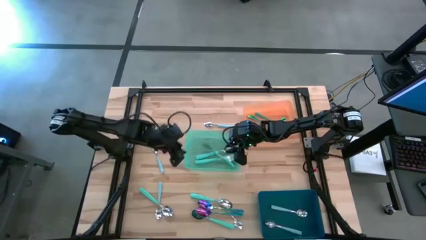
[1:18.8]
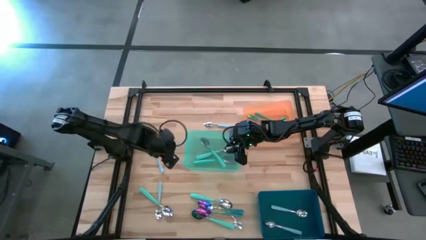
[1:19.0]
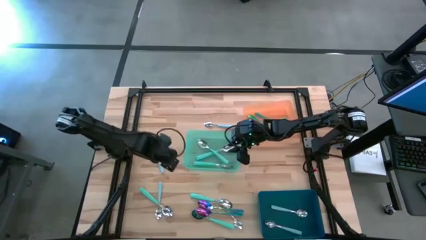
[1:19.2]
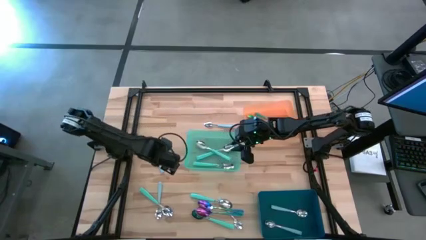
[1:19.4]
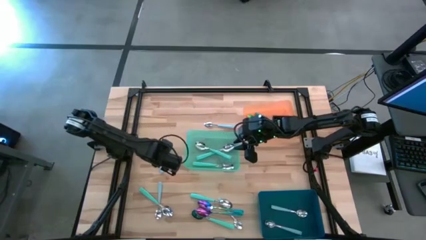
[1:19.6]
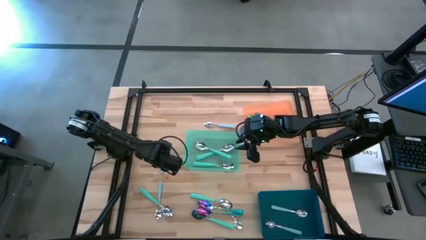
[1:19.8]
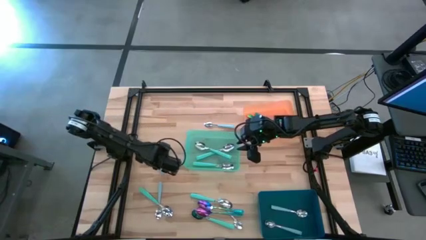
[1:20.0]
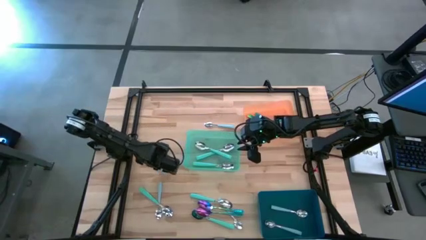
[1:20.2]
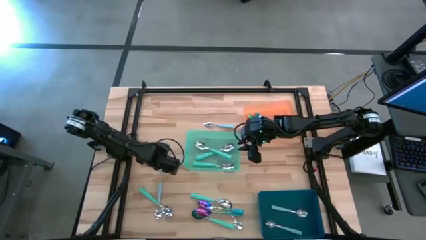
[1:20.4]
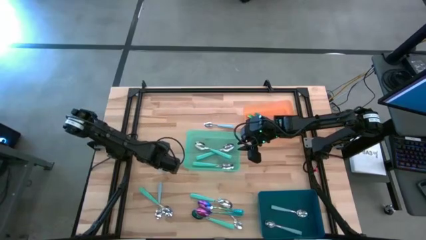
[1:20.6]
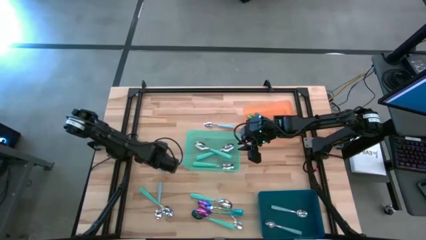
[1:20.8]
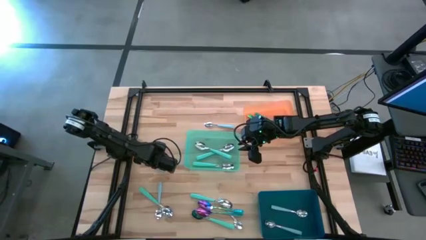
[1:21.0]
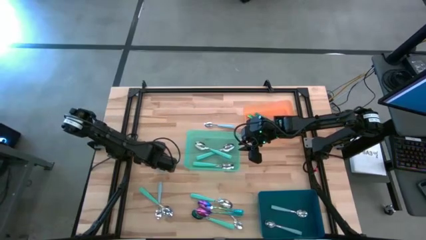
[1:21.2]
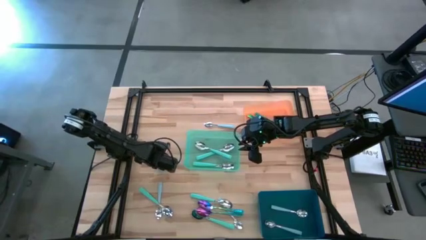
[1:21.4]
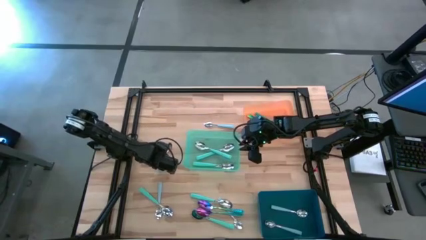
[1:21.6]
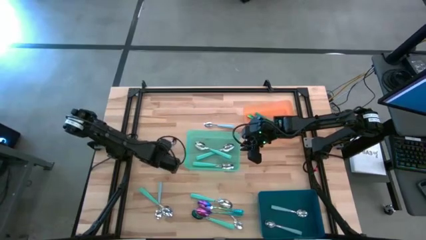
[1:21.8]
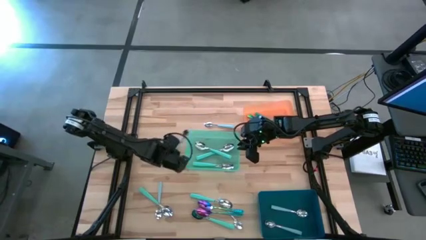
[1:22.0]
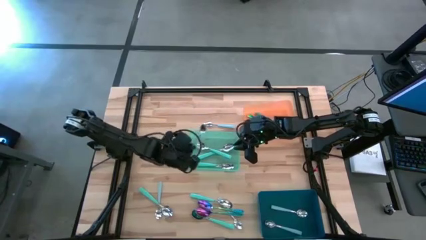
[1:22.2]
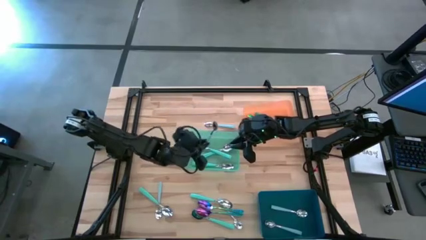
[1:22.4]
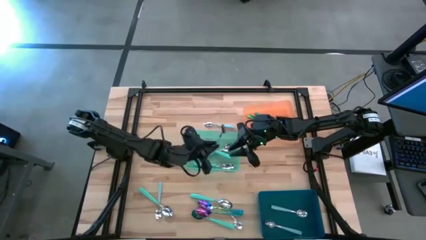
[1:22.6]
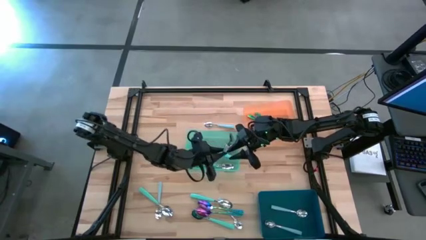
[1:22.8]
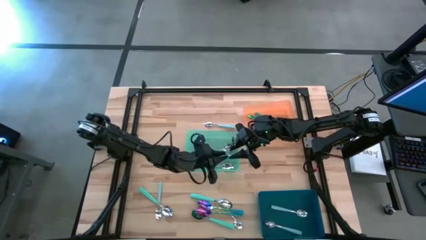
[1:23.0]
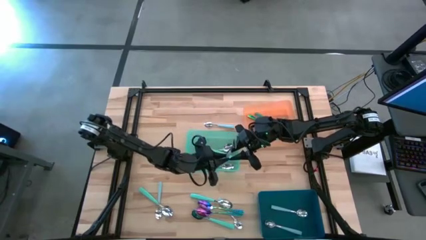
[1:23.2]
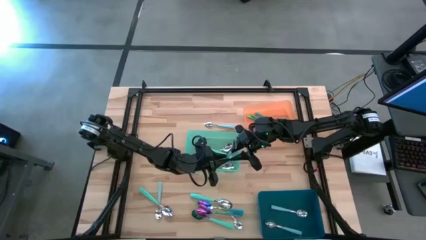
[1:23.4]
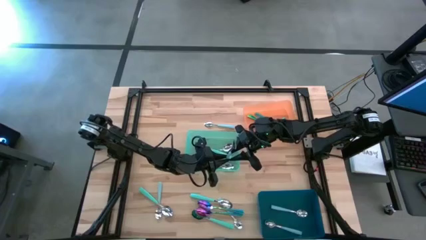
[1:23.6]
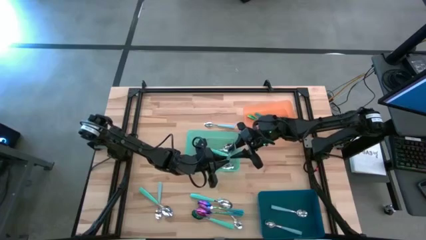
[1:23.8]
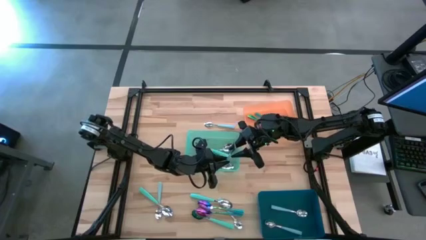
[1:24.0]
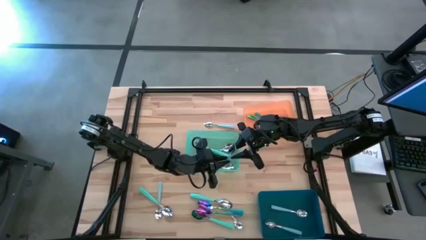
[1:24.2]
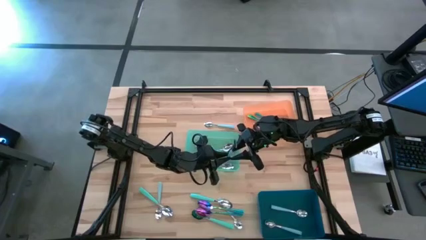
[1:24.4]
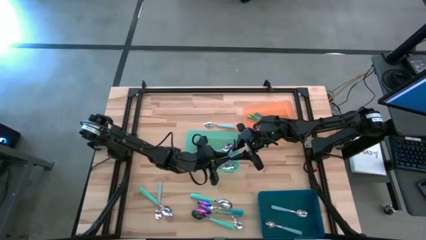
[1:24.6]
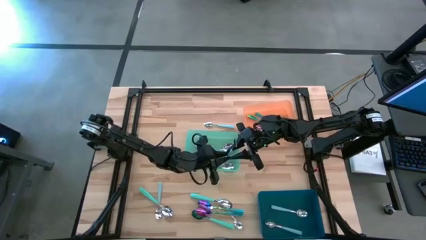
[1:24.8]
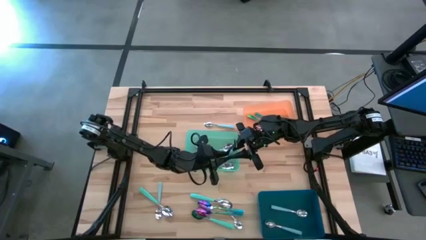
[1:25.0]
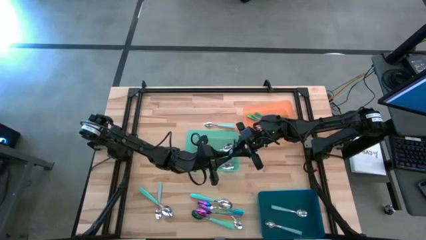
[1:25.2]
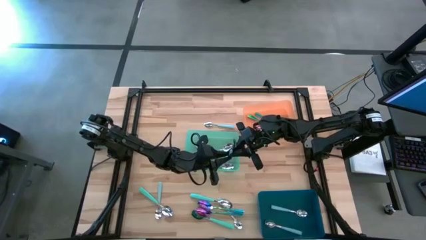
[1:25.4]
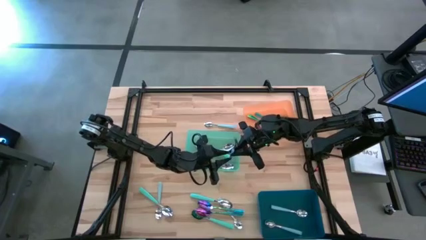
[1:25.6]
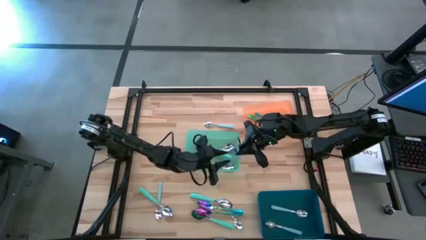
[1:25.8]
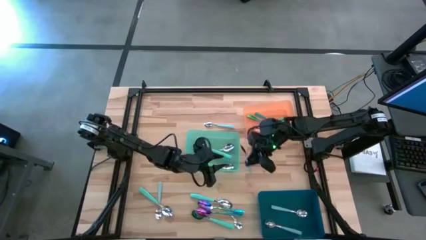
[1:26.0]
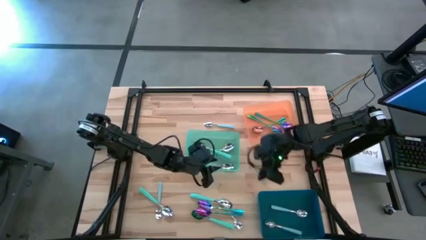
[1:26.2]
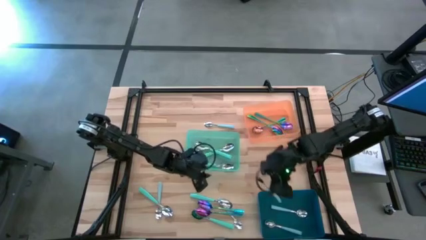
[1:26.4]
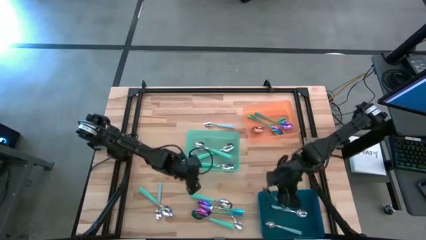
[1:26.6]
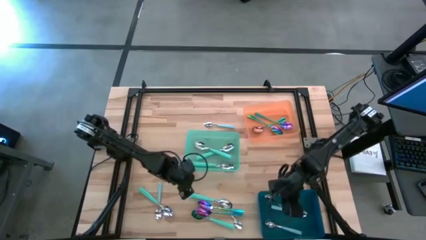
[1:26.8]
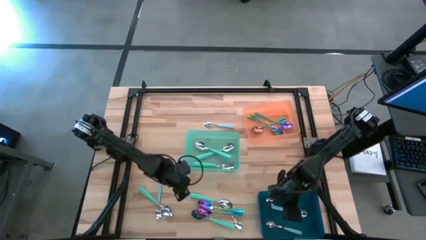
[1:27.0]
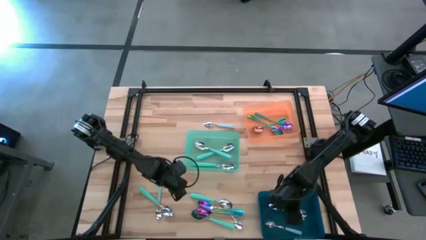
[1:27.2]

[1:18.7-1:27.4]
Task: Sort silverware by color (type)
Put the blue spoon into the blue bin

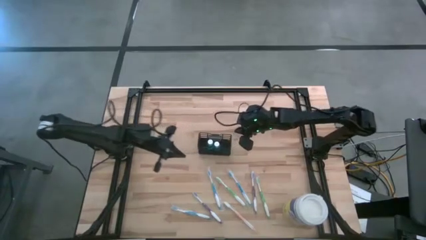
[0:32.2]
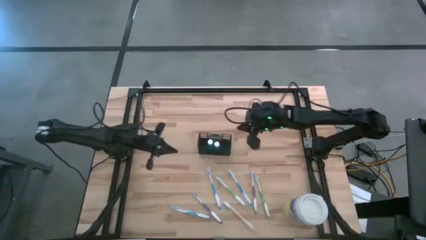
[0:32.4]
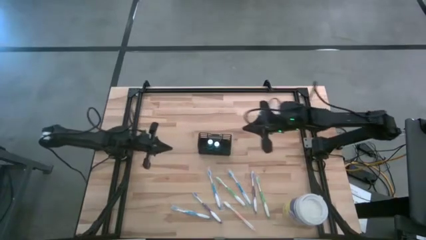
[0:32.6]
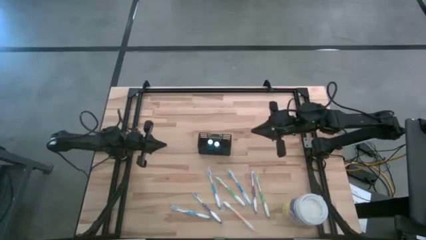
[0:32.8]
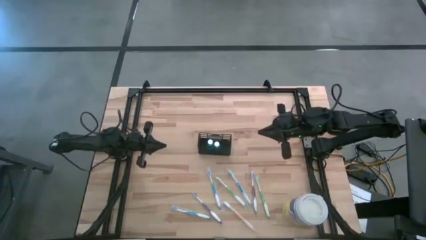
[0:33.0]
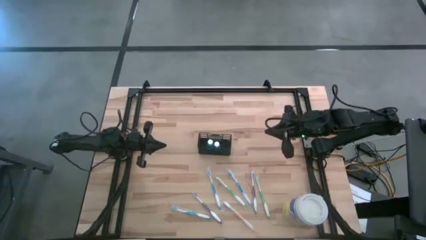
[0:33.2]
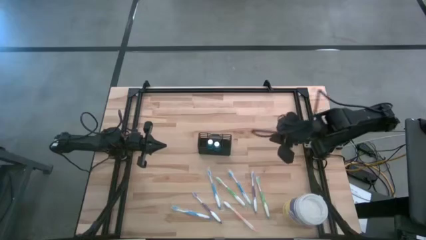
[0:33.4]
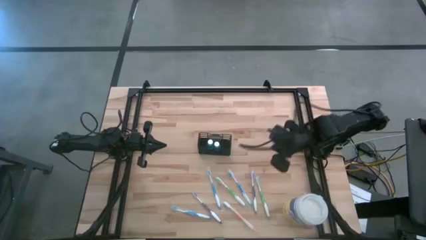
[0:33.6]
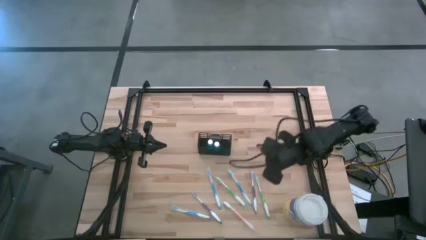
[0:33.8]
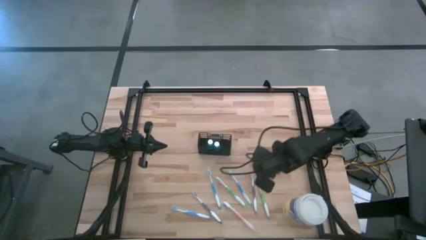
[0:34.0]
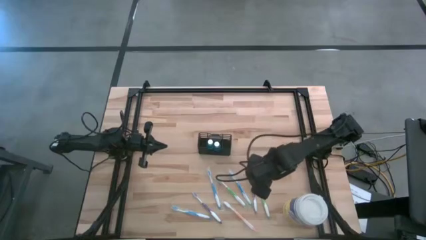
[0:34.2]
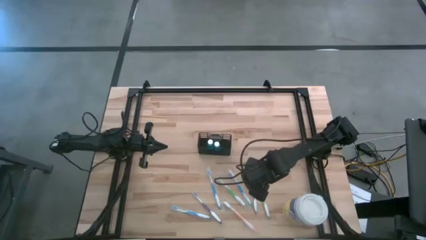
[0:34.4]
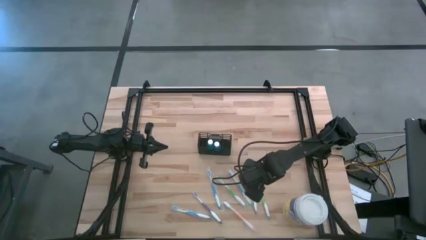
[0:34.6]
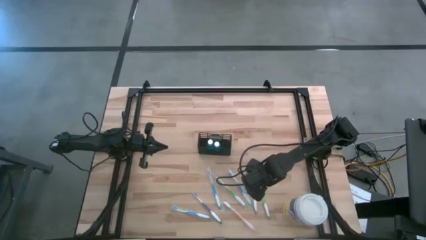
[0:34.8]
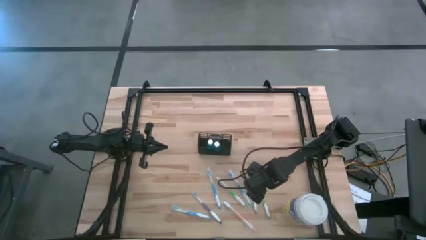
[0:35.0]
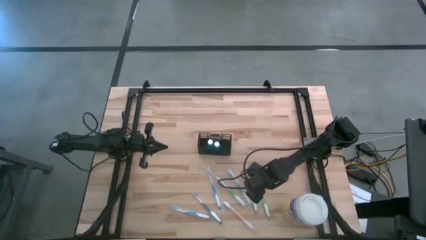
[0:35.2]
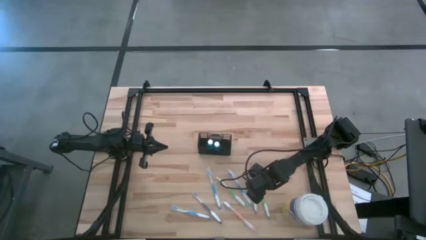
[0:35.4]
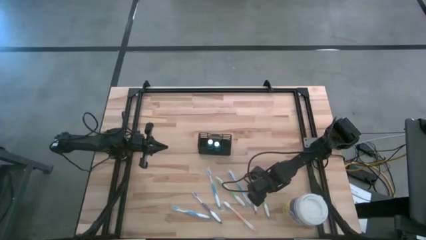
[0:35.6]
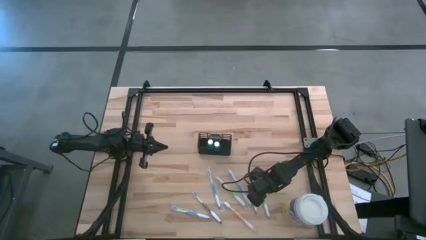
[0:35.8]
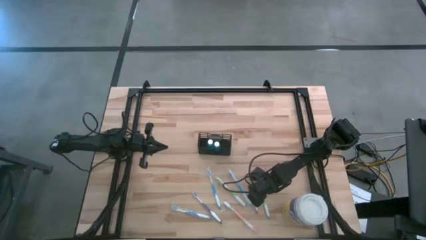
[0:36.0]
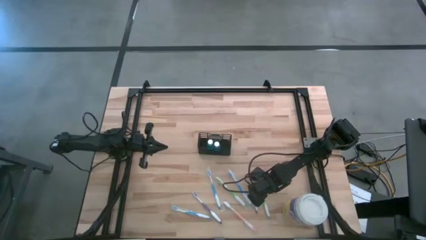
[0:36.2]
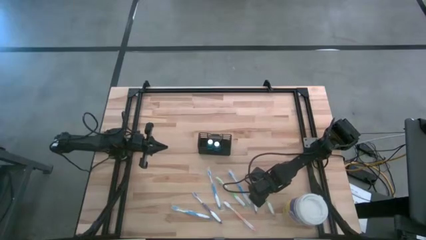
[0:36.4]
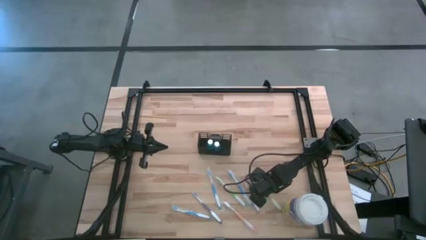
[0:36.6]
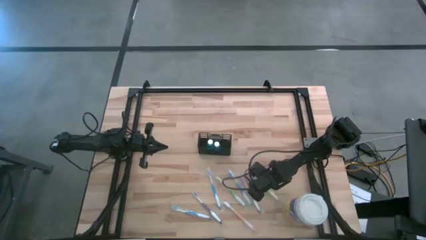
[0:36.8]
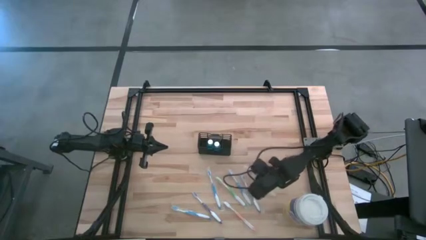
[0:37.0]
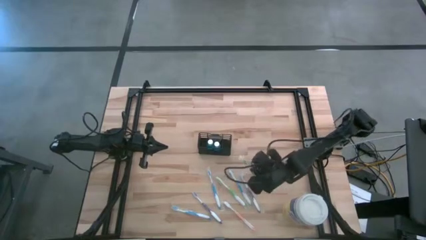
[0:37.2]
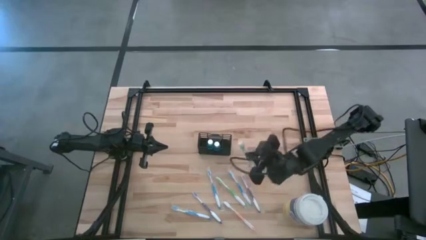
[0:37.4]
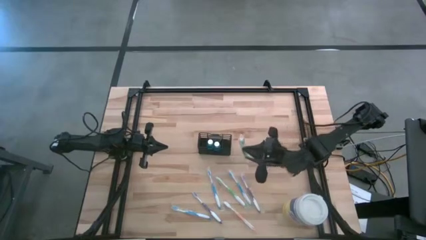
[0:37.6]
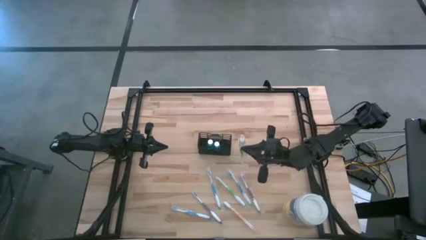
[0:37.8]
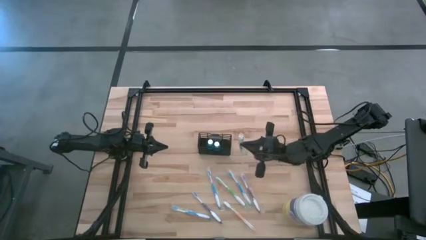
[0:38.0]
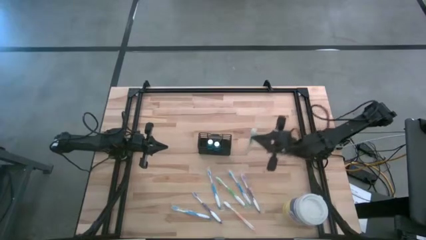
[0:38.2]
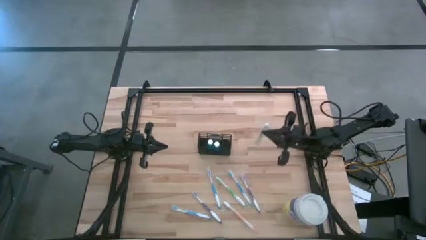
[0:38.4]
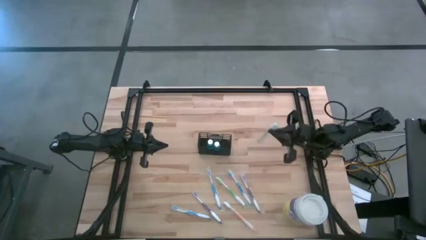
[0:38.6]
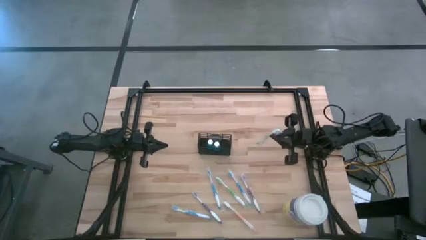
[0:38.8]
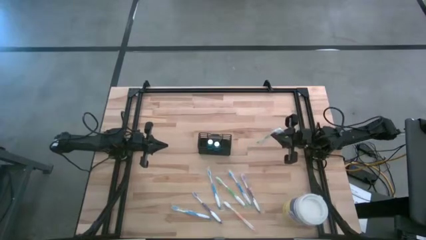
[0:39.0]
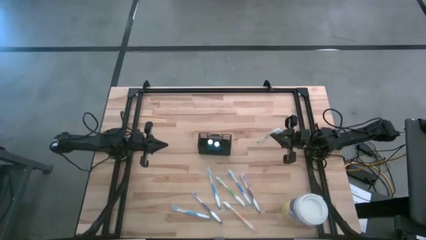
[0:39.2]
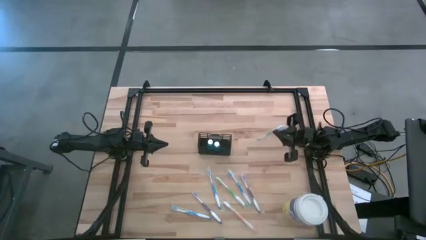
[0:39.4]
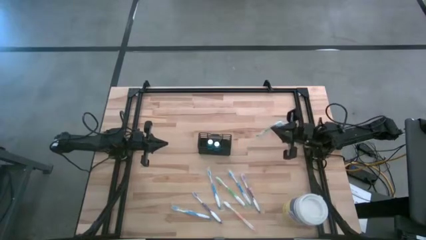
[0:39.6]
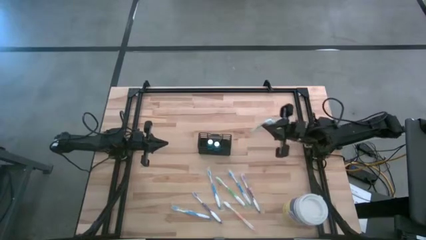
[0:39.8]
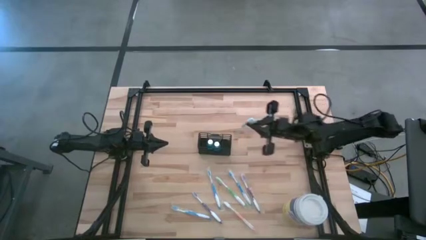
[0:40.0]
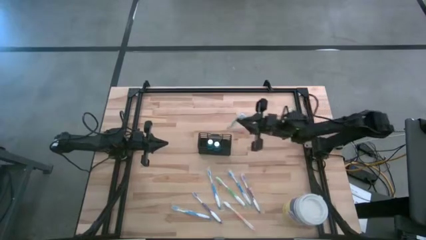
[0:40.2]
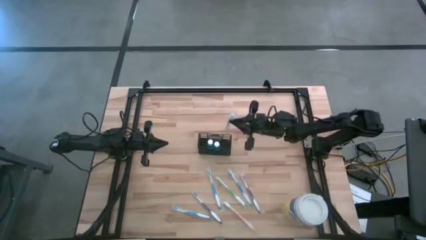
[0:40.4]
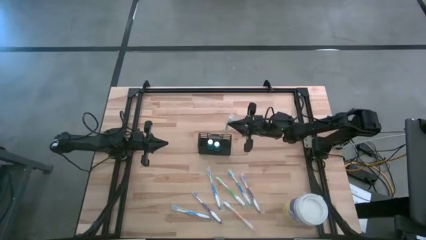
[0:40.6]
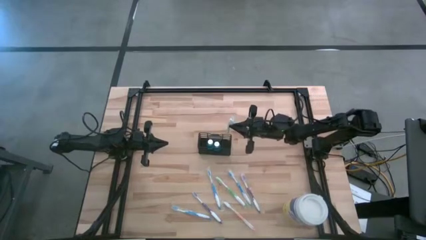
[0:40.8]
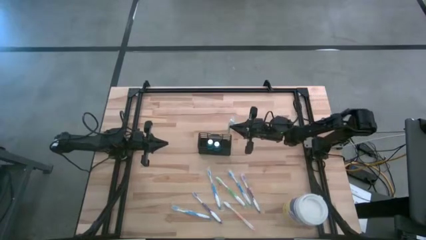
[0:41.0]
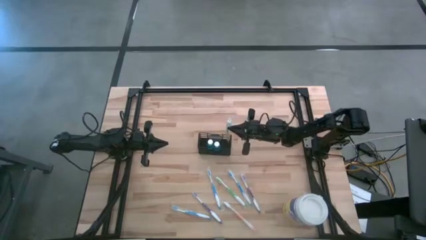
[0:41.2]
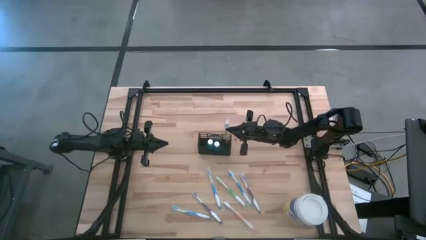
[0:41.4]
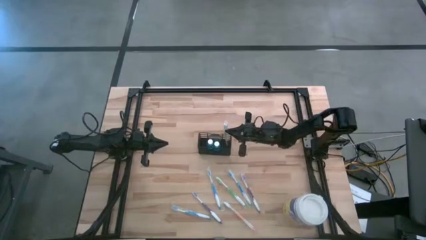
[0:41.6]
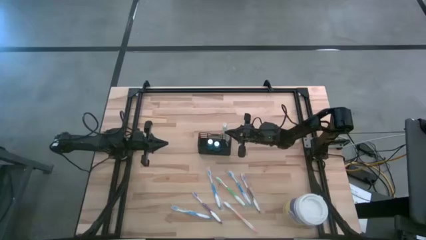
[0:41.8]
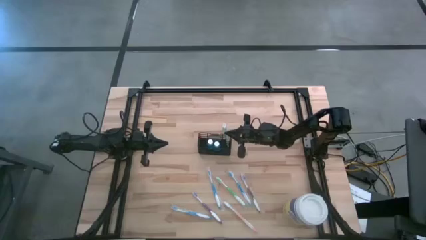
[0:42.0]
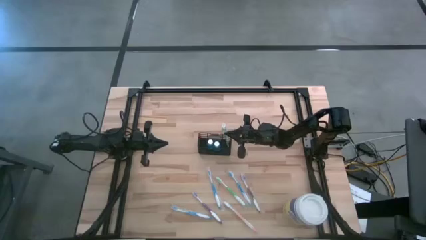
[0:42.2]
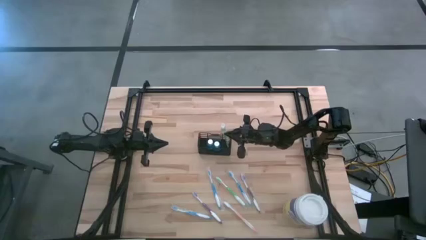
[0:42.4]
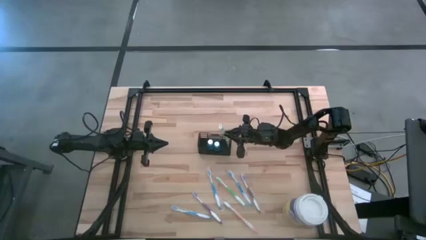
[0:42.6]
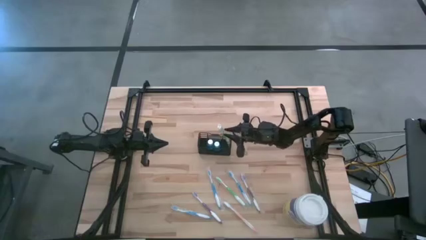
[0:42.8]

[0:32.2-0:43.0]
Task: Pick & Place toothbrushing station
Put the right green toothbrush into the black wire organizer
